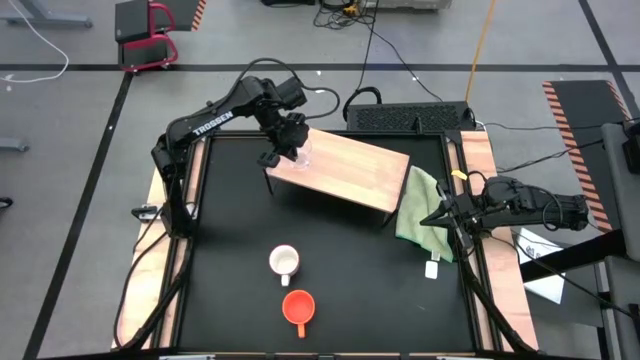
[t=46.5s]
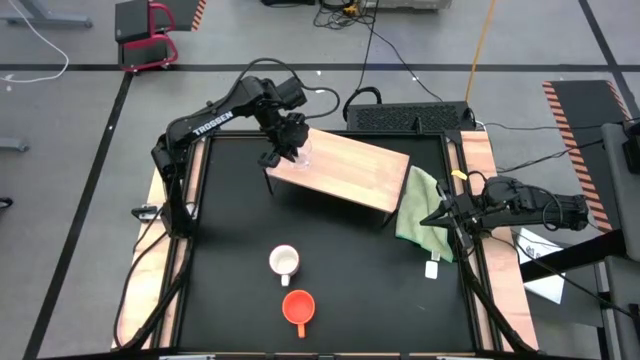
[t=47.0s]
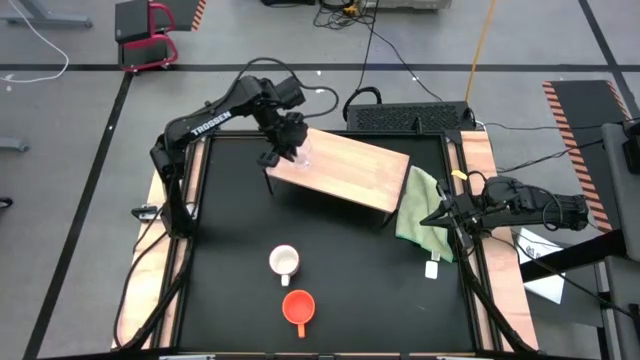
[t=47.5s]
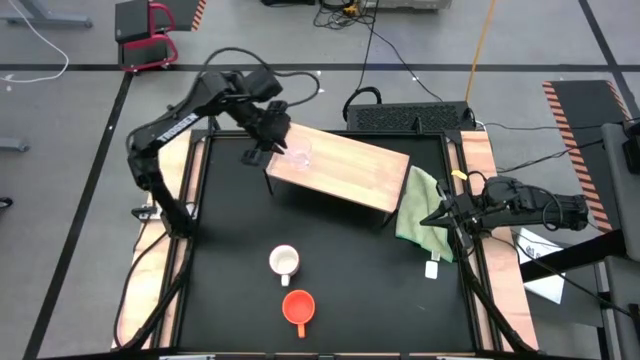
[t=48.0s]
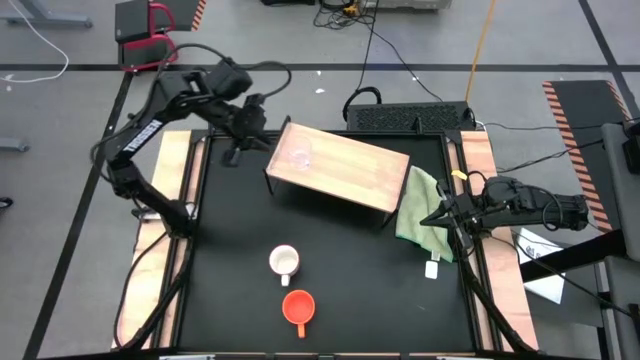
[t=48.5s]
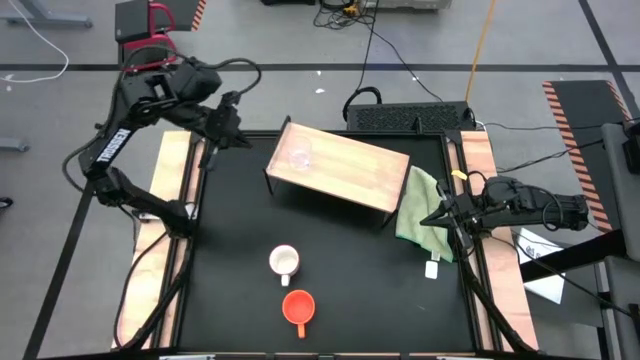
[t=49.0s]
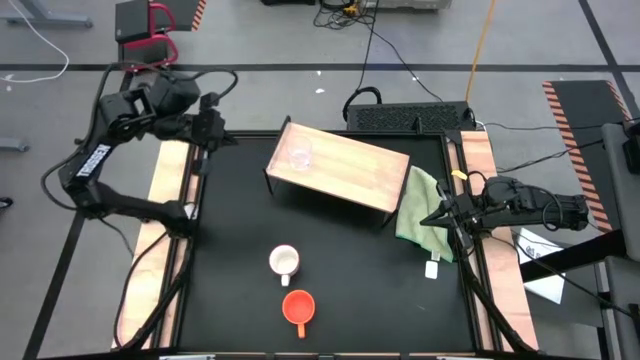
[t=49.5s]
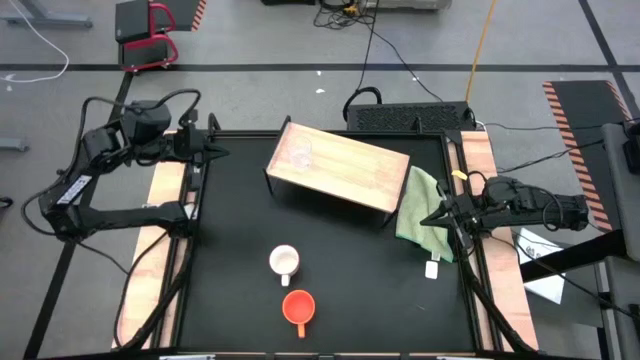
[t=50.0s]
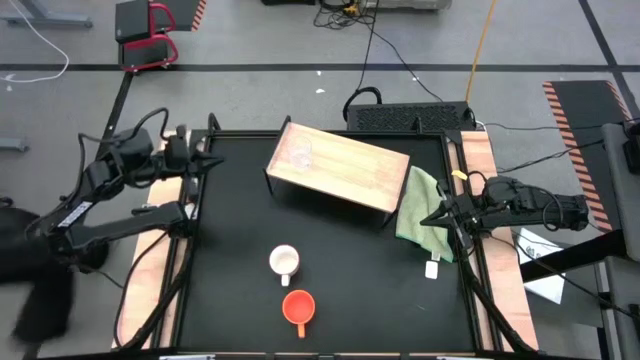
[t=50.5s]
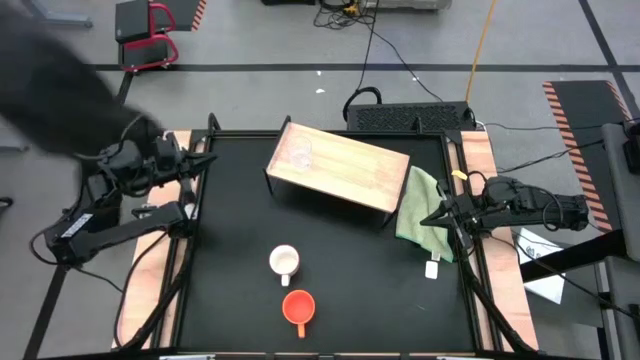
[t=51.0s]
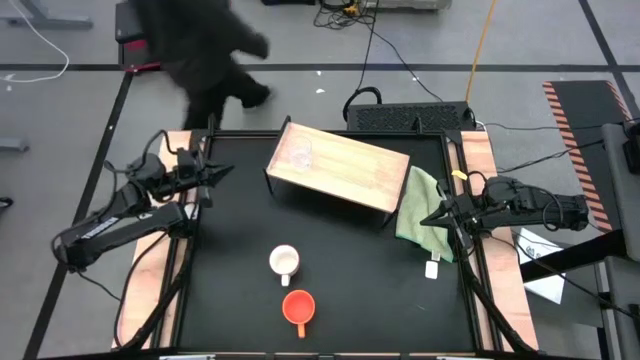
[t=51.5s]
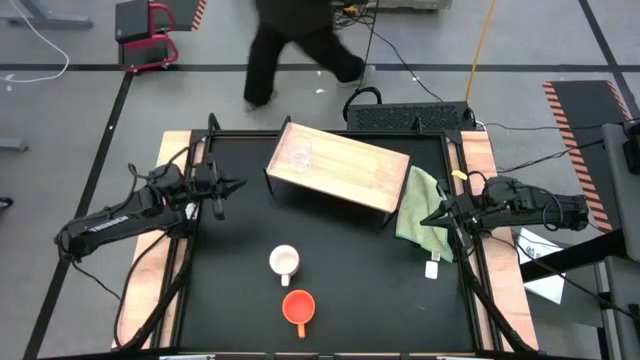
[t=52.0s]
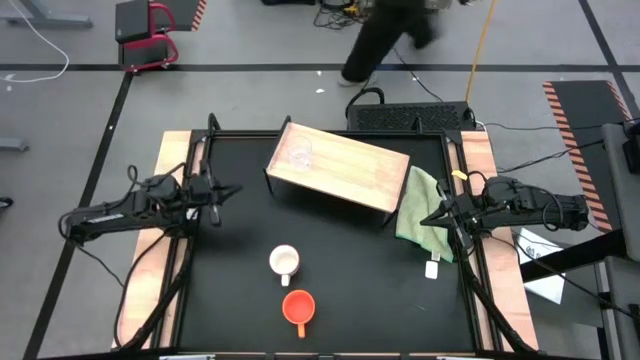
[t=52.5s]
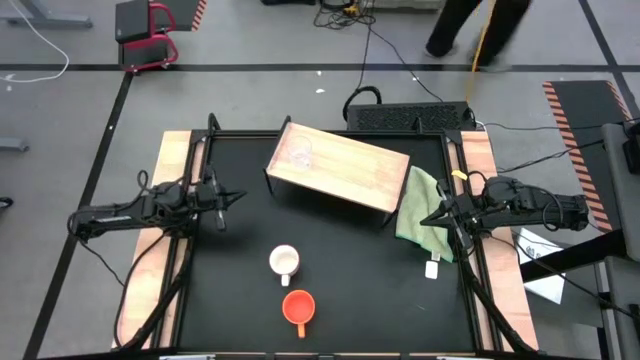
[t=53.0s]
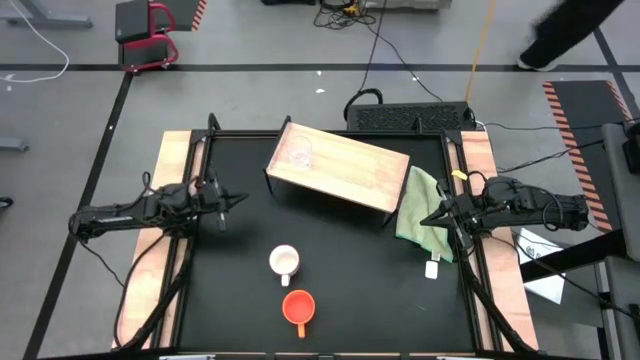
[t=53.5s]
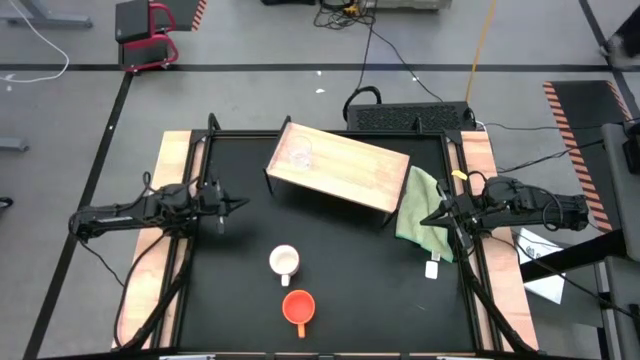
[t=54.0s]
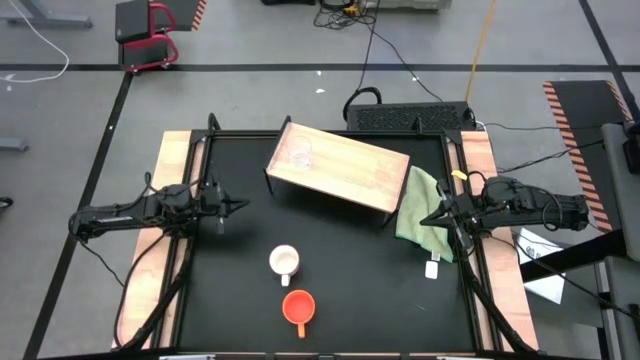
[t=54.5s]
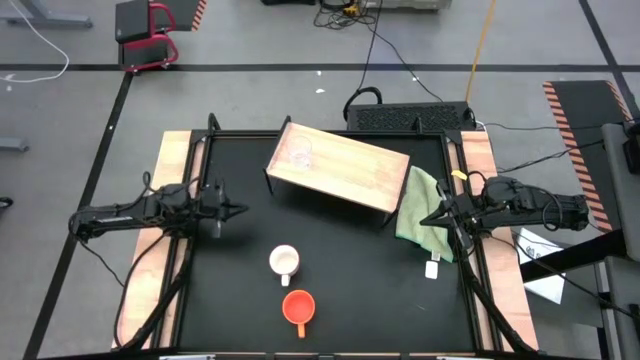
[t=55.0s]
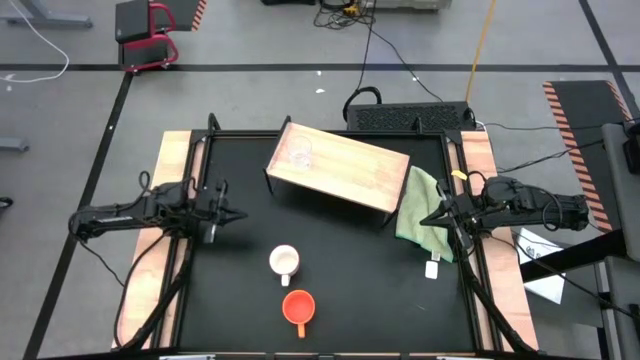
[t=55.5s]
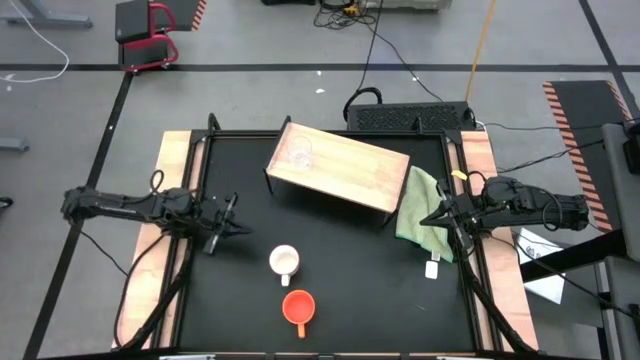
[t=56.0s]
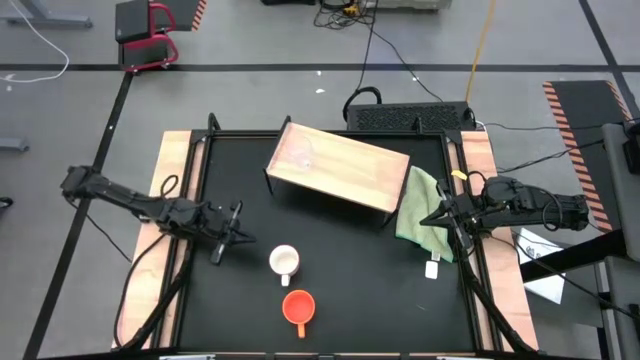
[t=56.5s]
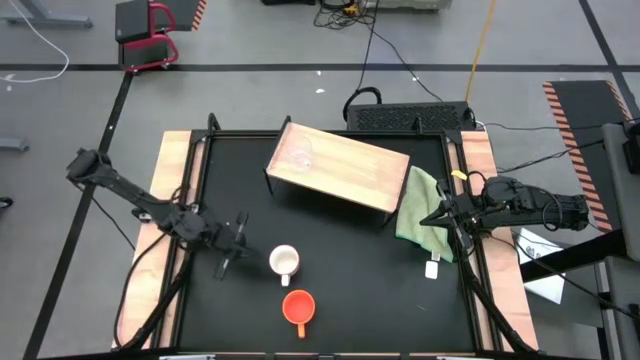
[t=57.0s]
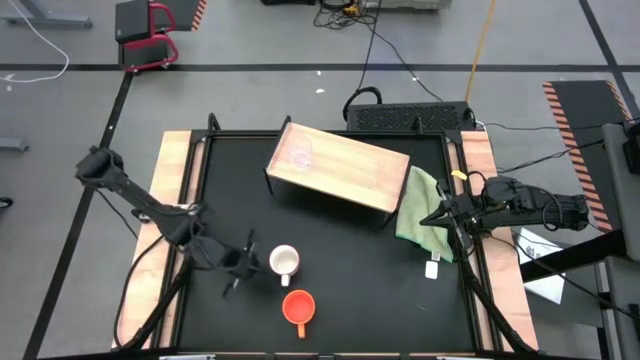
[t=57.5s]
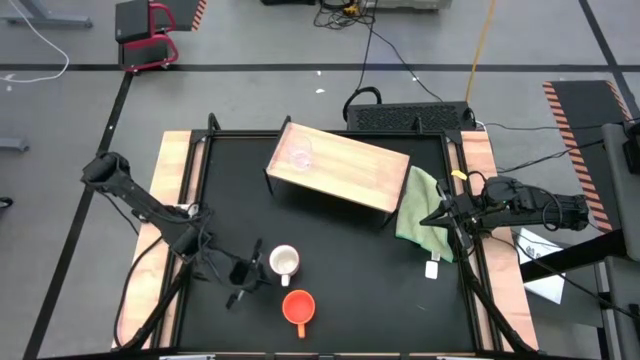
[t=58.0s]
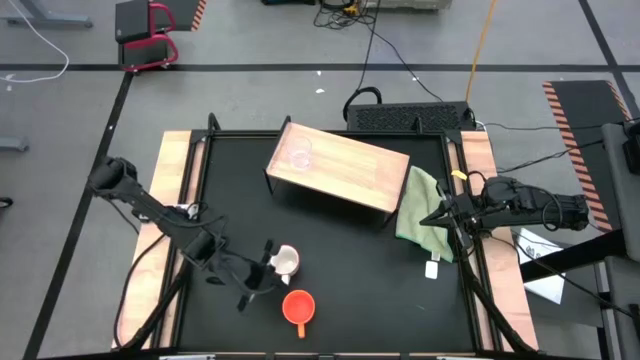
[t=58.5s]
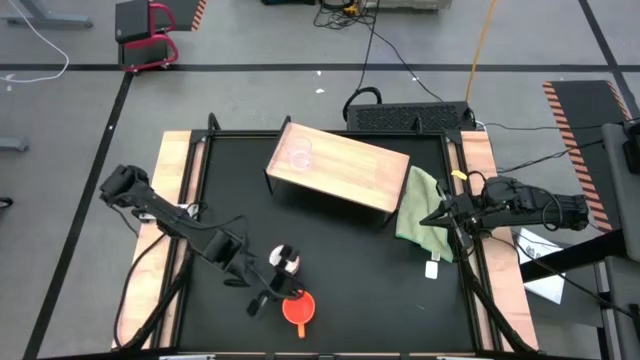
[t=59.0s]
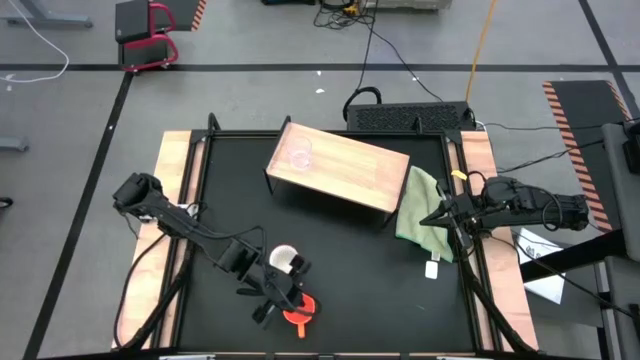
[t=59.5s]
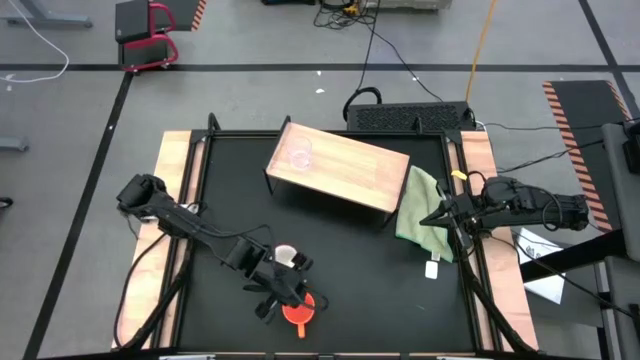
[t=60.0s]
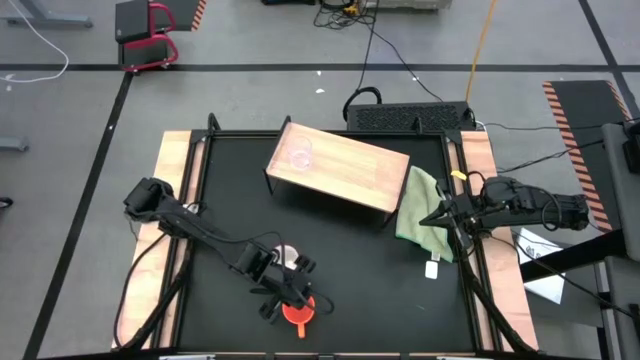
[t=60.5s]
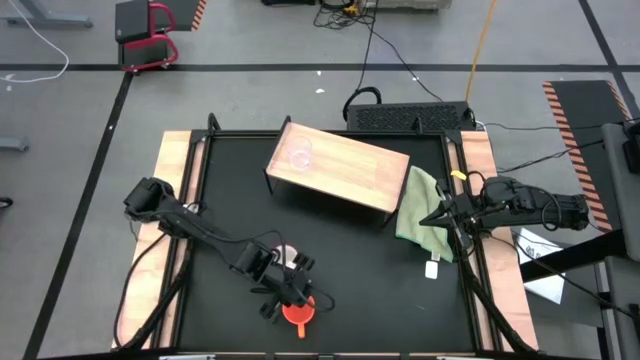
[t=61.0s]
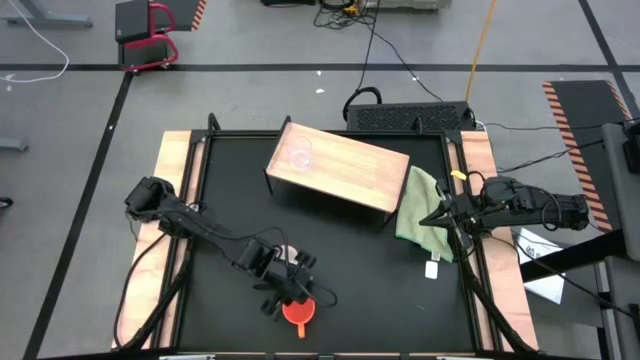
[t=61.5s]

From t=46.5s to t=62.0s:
Task: Stack small to large cups/mugs on shelf
Put the orange mug on the shelf
